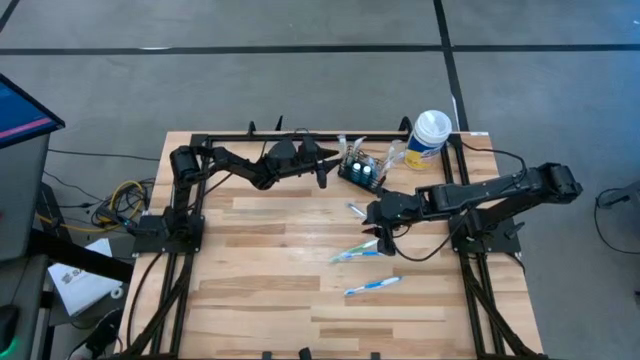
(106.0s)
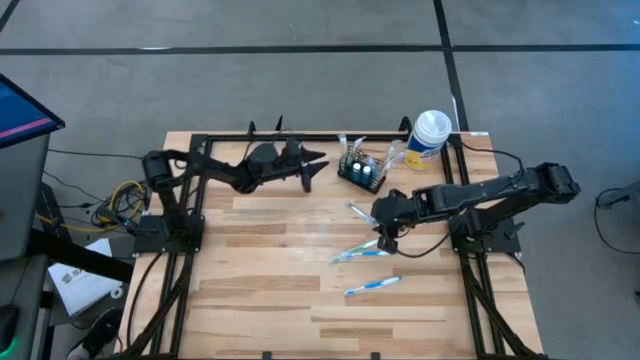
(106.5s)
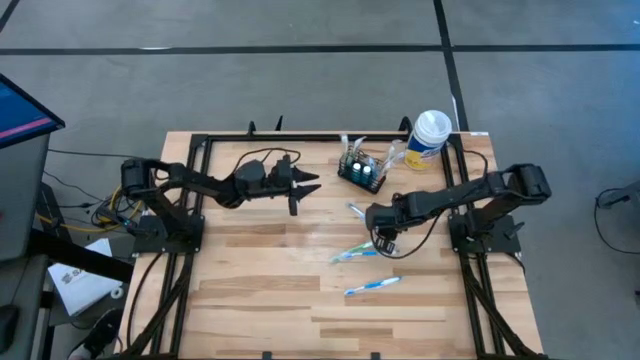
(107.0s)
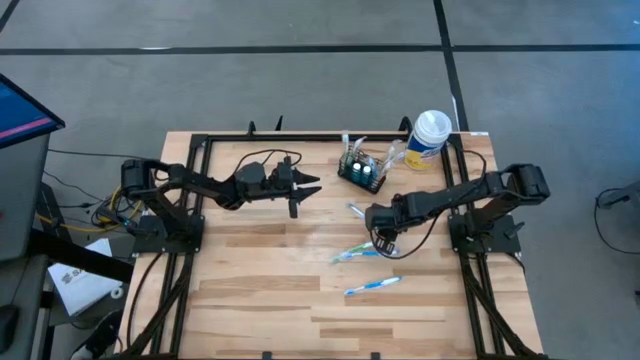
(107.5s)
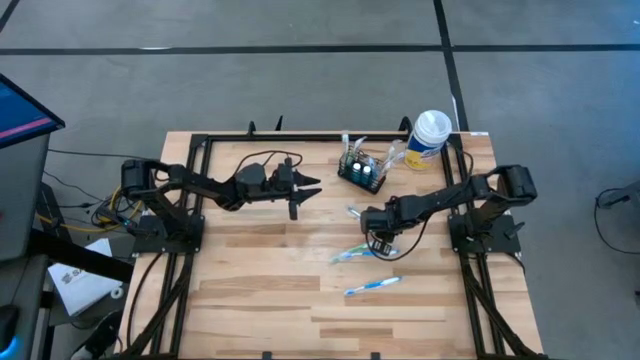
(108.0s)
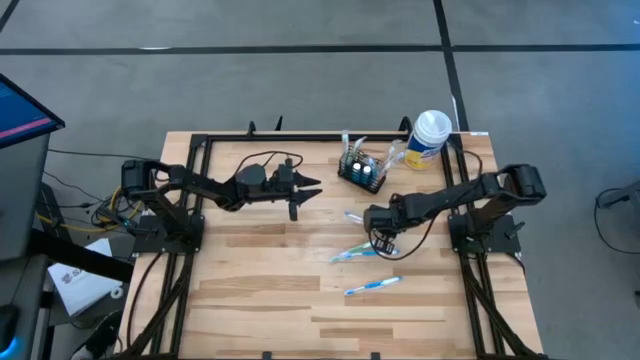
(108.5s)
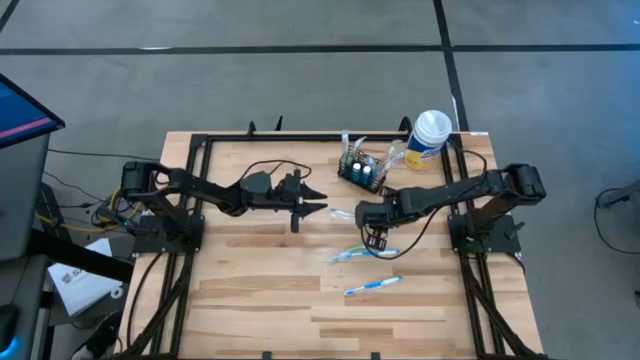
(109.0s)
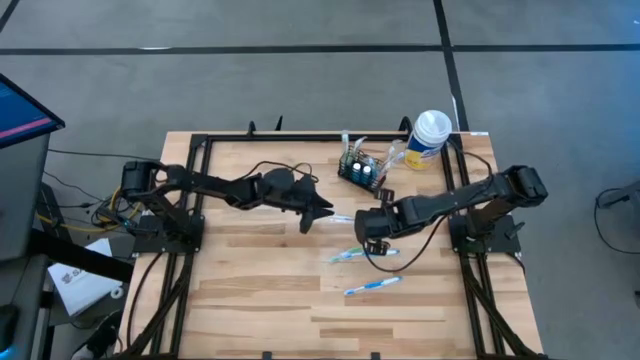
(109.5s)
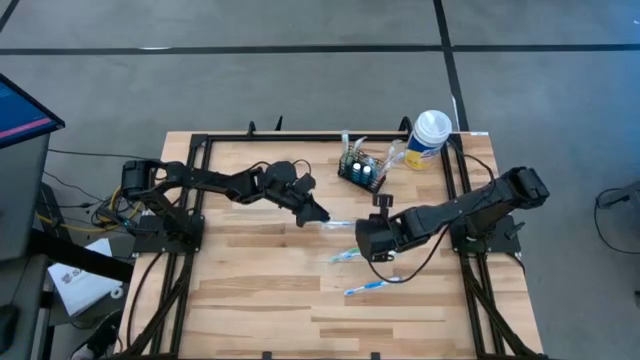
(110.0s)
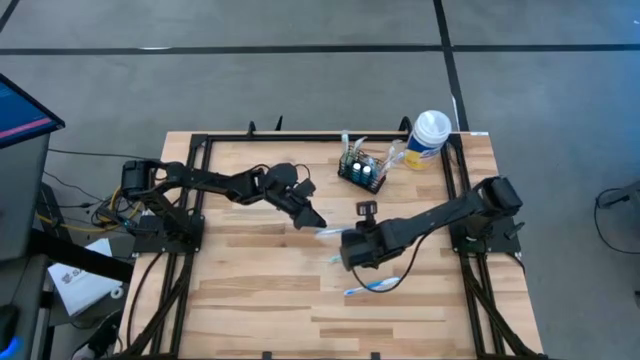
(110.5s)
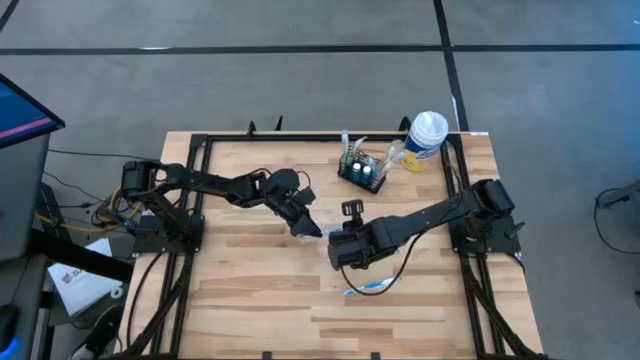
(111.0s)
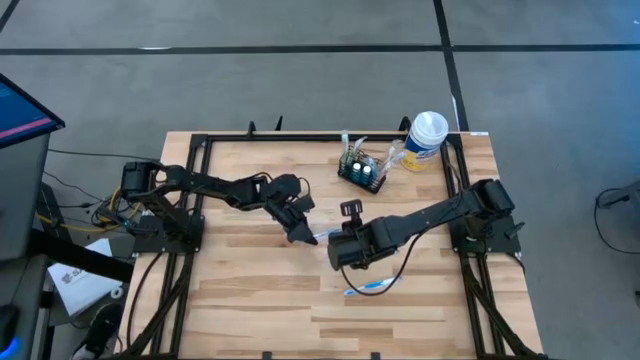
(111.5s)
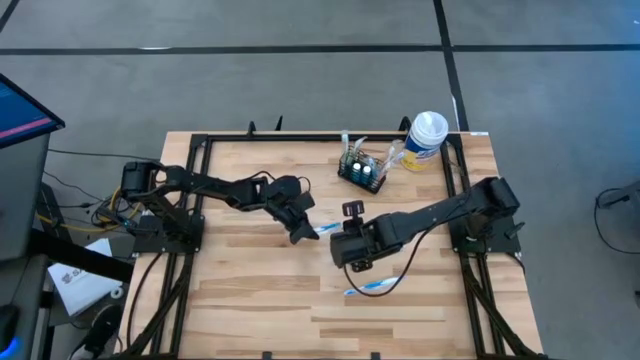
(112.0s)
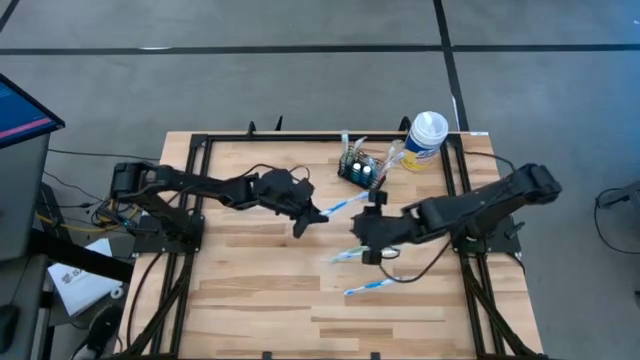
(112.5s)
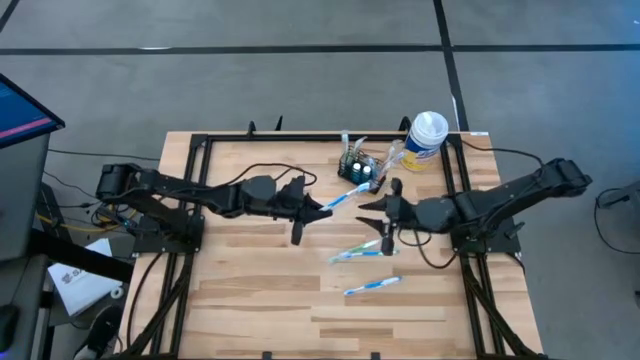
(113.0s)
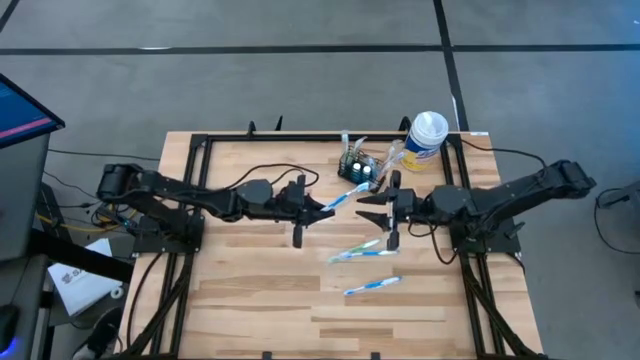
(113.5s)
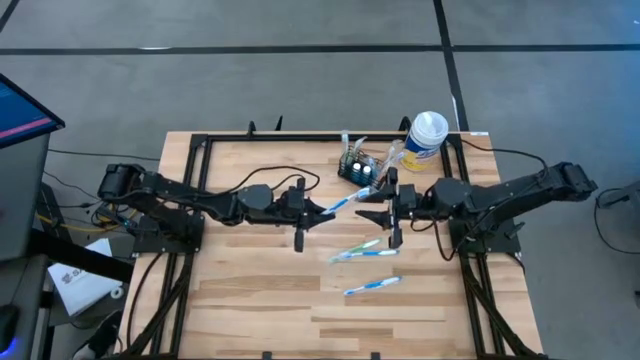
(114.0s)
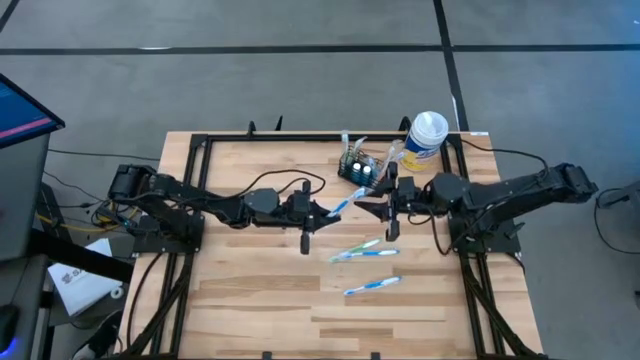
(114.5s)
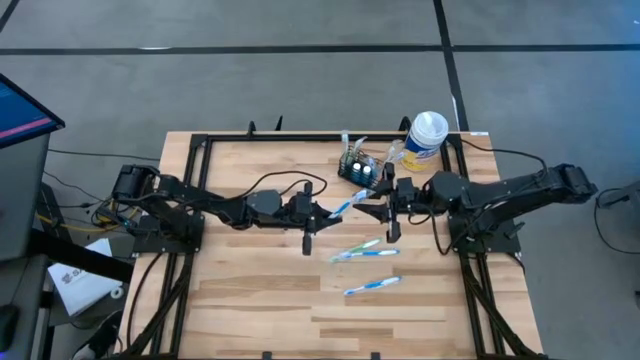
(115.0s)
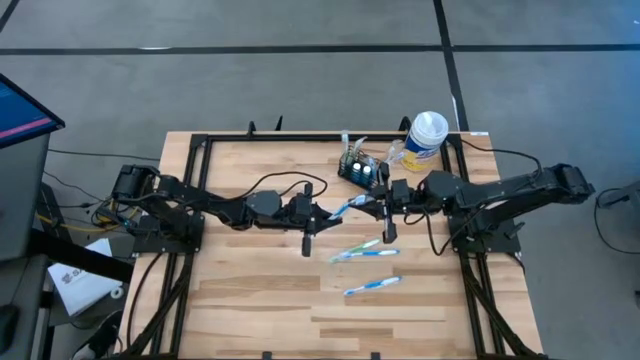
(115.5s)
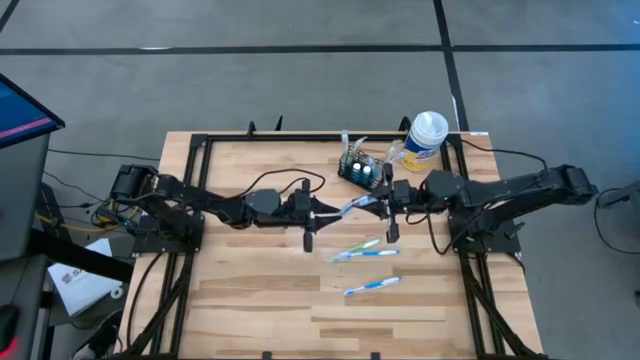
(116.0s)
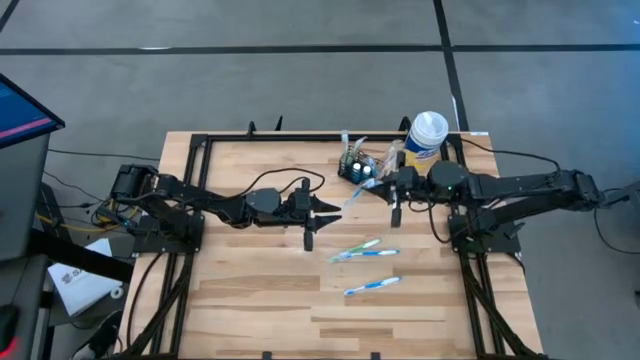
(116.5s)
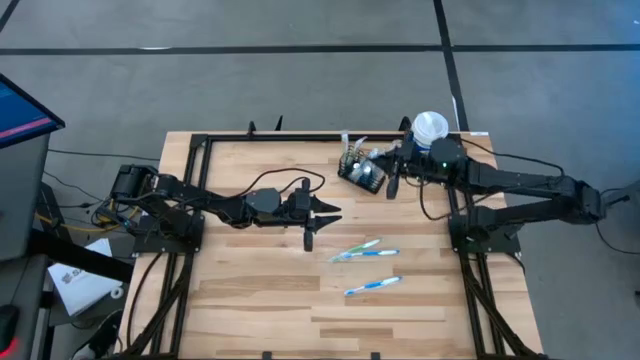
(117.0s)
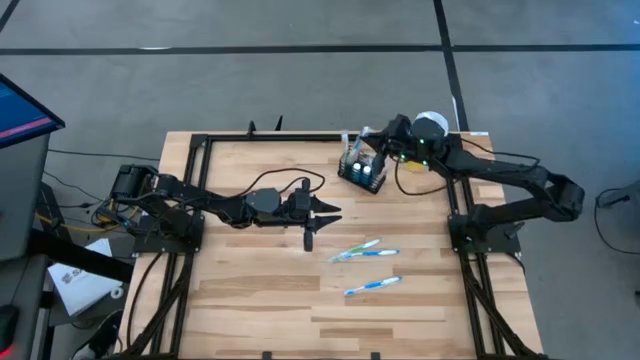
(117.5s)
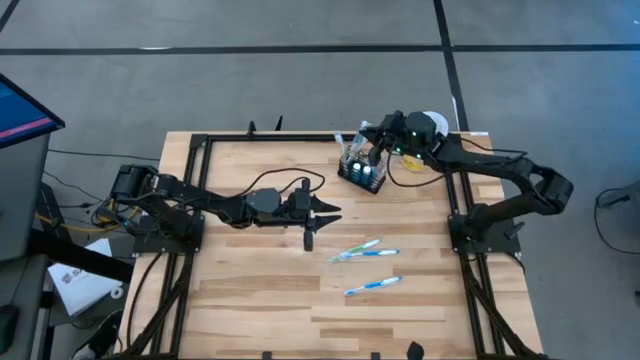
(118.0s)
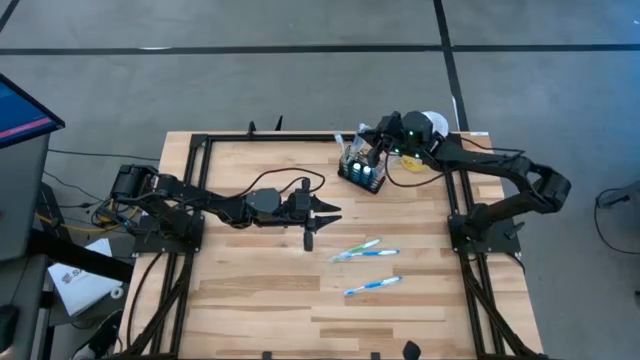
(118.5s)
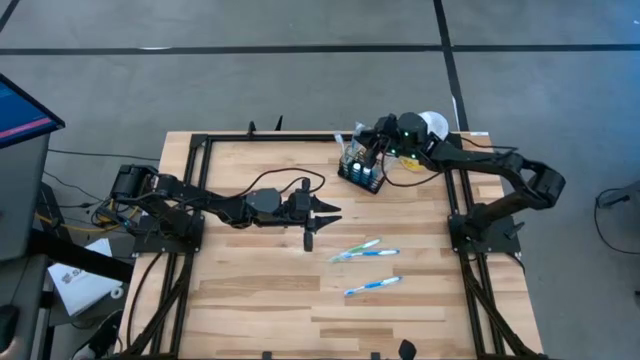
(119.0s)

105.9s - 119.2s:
Task: Pick & Place toothbrushing station
Put the blue toothbrush into the mesh organizer

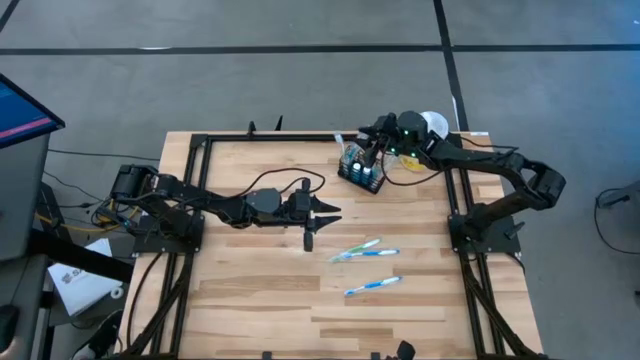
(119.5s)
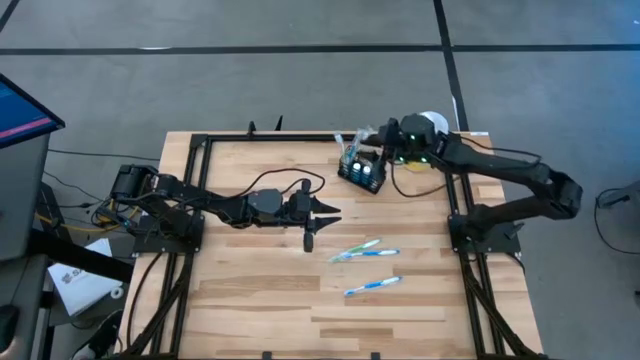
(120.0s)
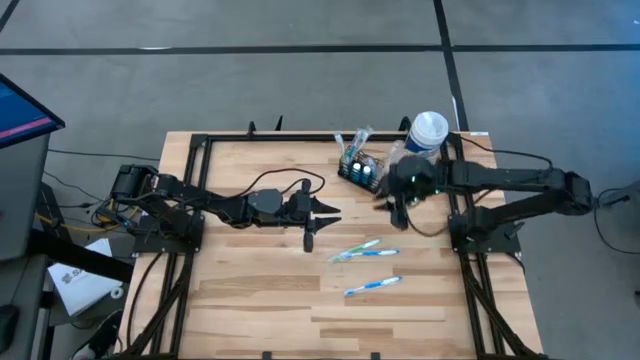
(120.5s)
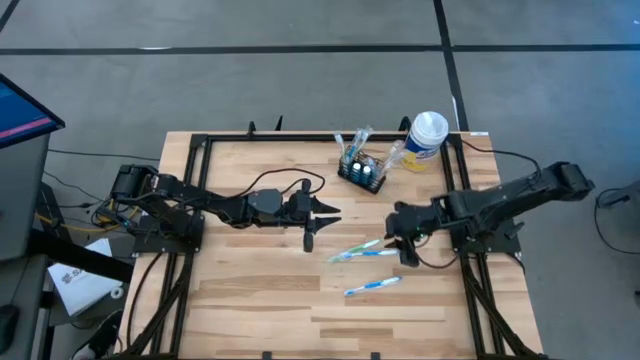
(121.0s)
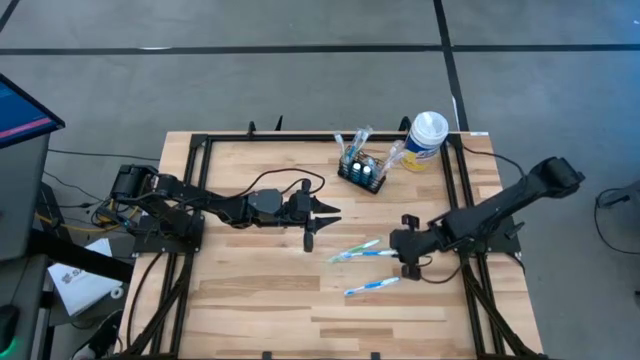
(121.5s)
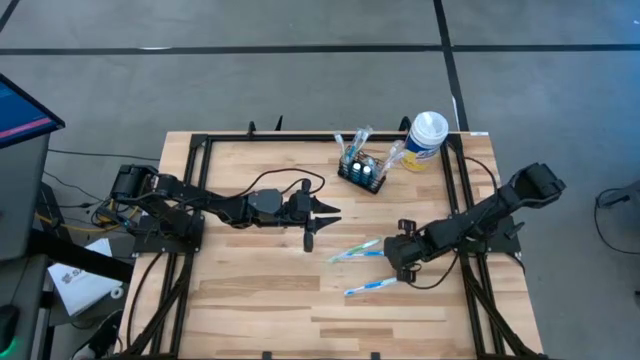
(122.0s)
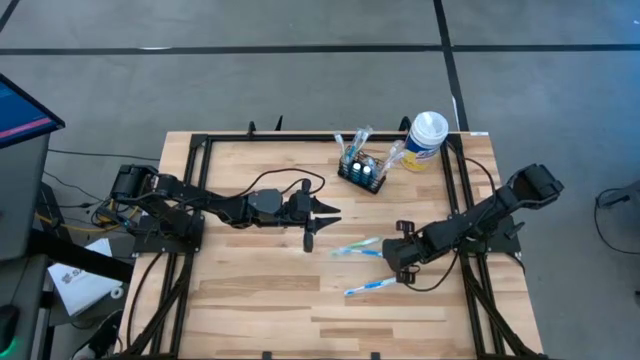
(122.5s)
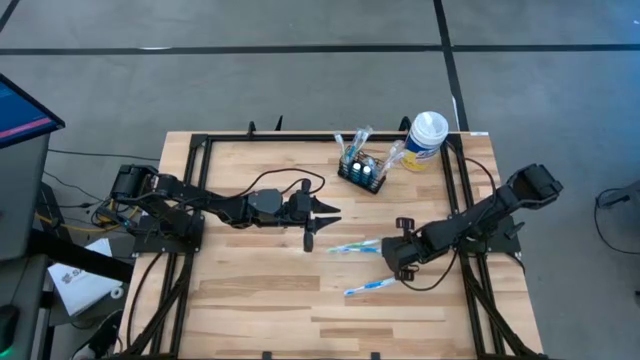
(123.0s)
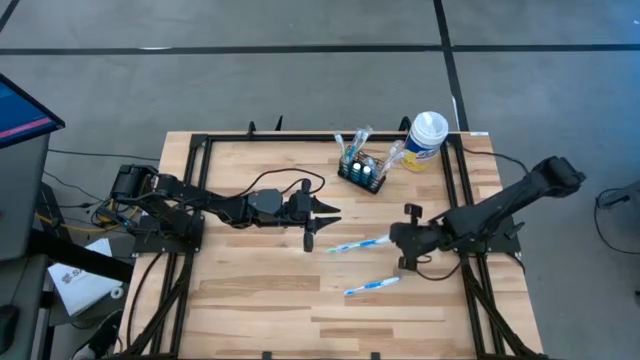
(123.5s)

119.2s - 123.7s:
Put the blue toothbrush into the mesh organizer

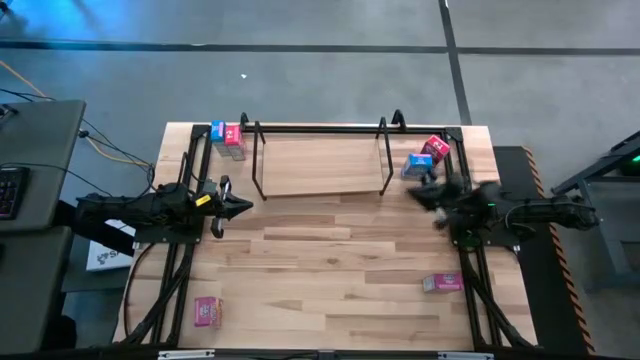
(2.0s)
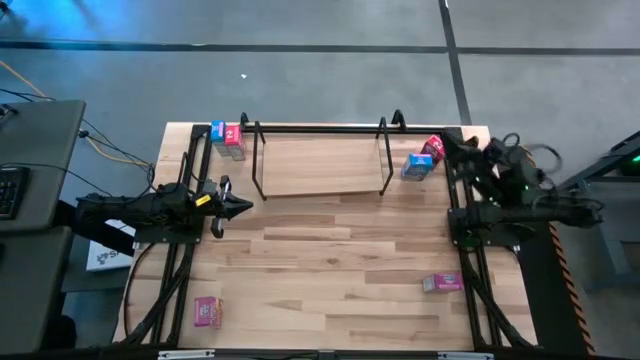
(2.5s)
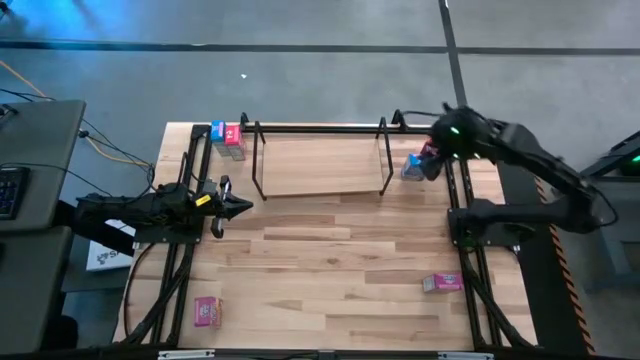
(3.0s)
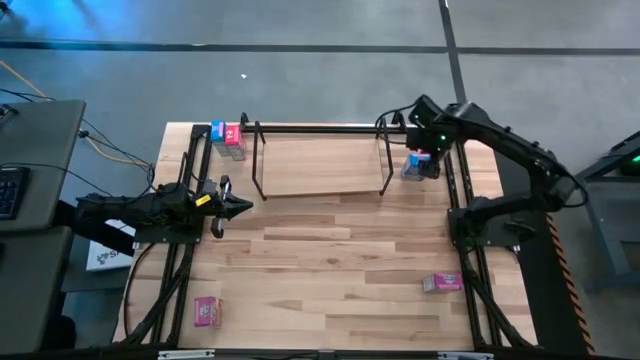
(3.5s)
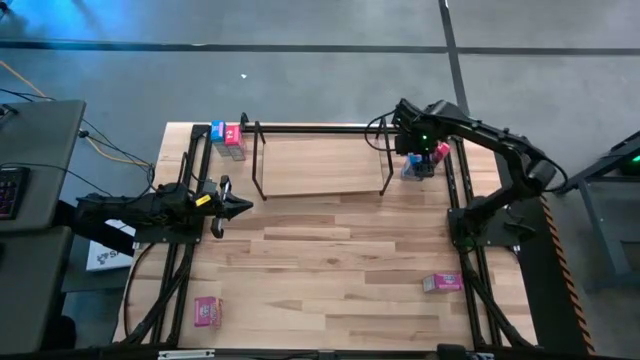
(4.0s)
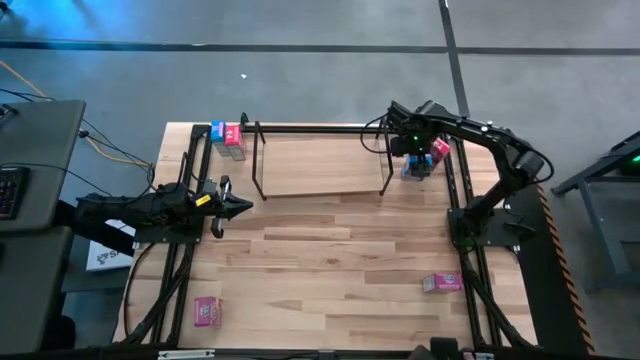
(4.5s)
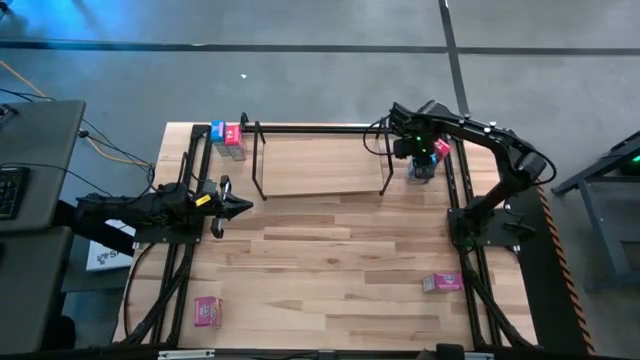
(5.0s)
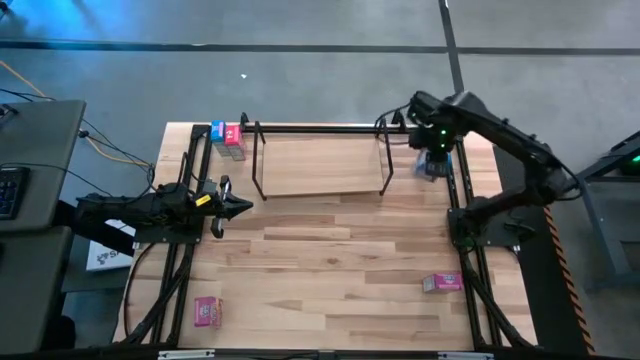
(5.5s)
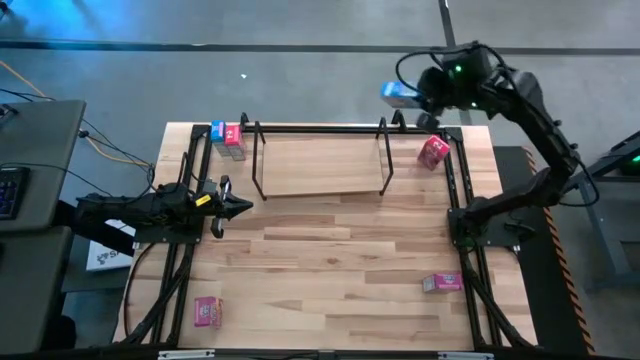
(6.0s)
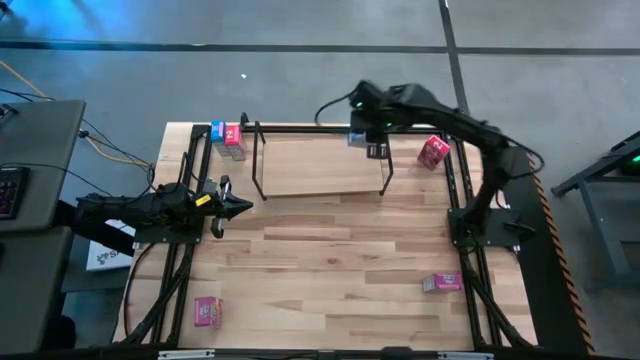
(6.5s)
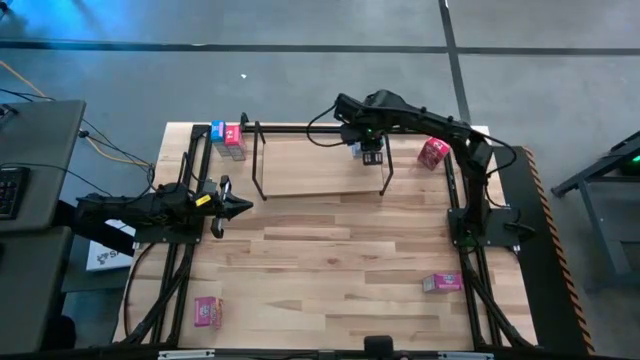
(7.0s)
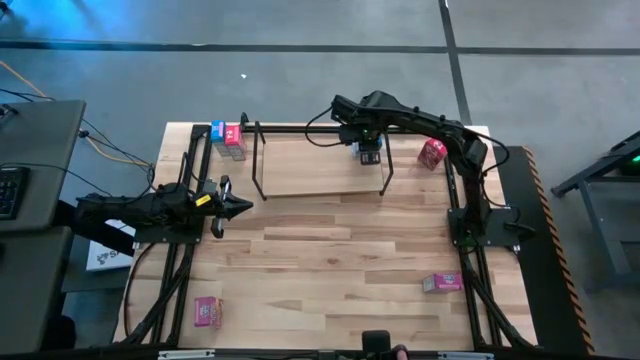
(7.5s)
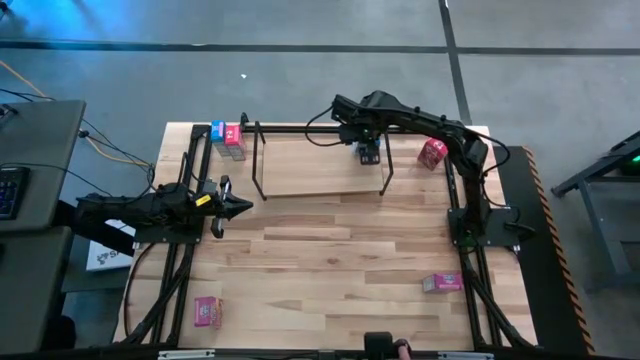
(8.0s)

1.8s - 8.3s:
Task: Stack cereal on shelf
Put the bottom blue cereal box on the shelf
